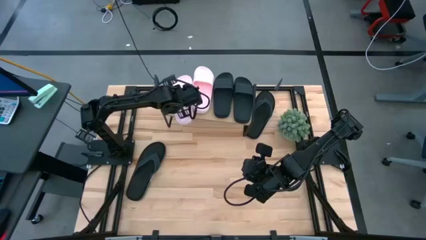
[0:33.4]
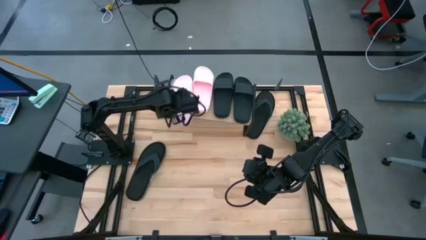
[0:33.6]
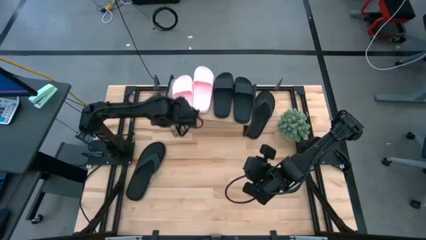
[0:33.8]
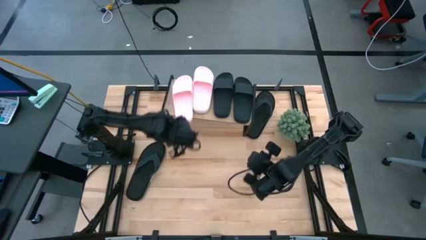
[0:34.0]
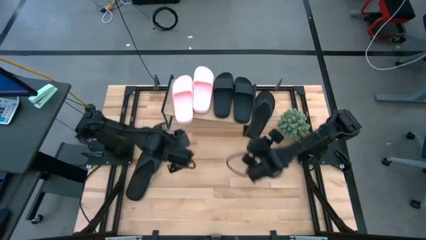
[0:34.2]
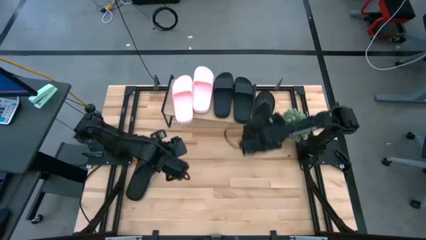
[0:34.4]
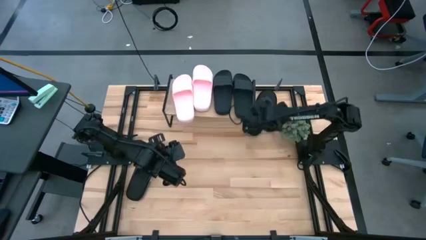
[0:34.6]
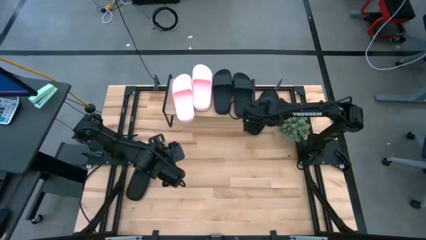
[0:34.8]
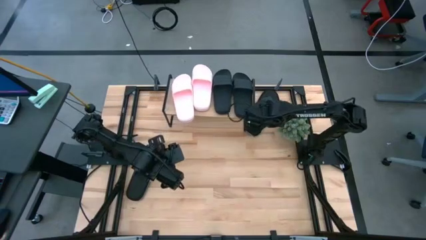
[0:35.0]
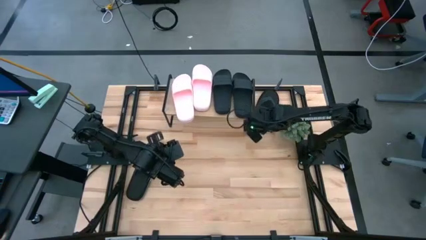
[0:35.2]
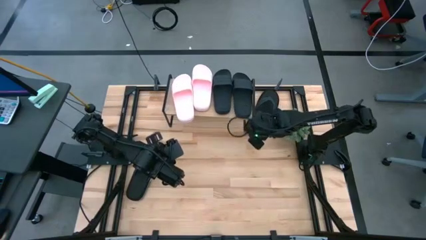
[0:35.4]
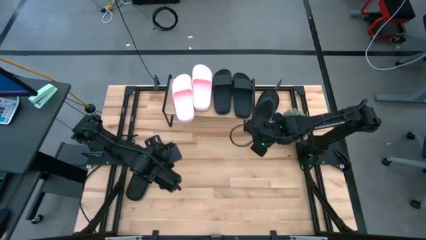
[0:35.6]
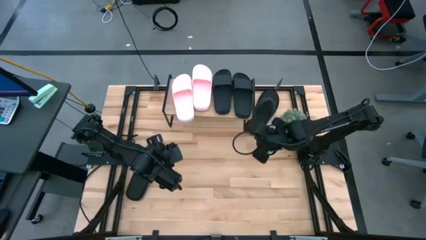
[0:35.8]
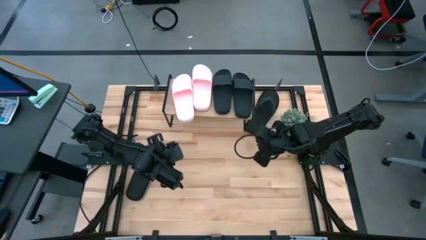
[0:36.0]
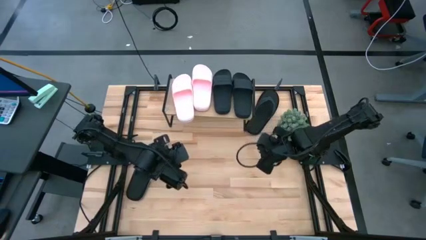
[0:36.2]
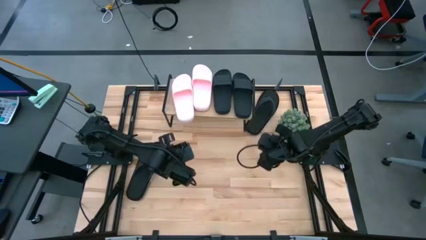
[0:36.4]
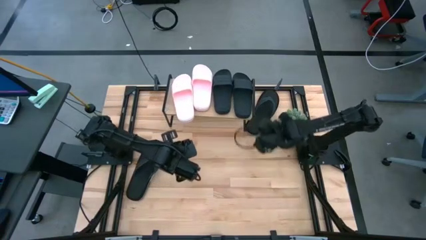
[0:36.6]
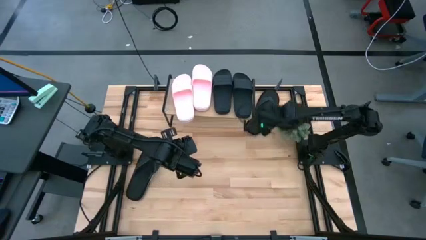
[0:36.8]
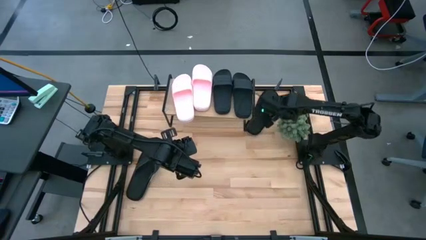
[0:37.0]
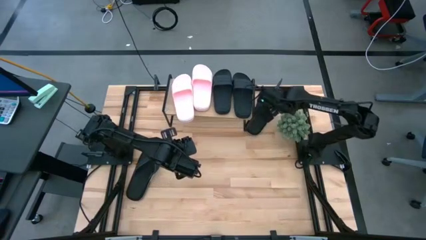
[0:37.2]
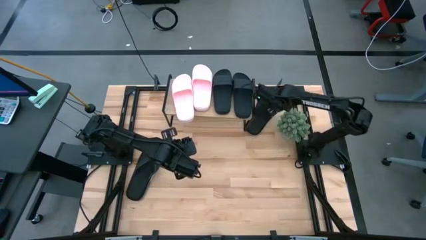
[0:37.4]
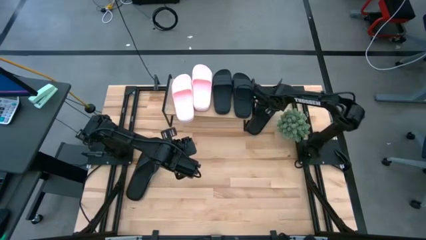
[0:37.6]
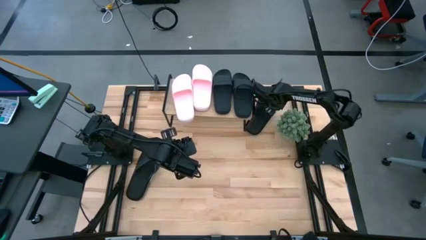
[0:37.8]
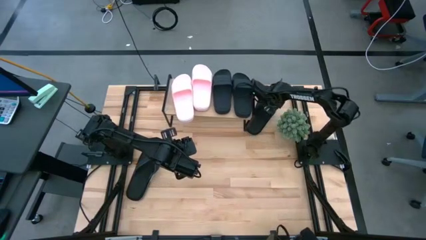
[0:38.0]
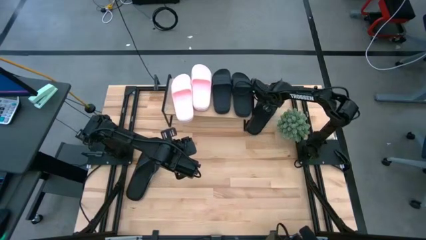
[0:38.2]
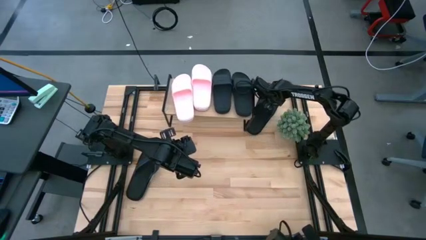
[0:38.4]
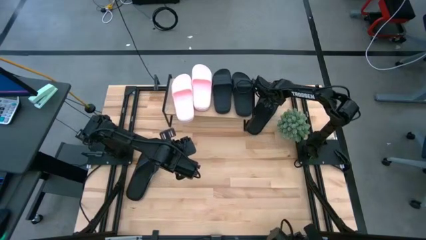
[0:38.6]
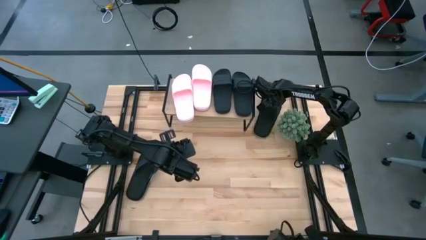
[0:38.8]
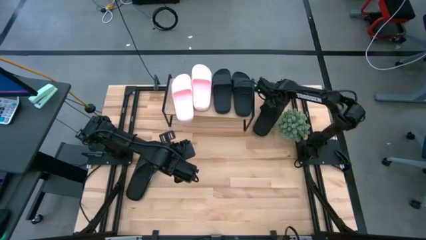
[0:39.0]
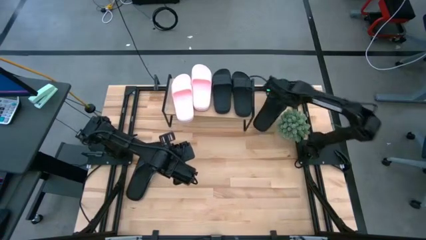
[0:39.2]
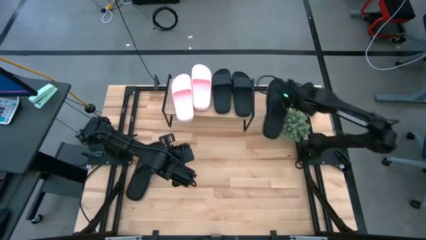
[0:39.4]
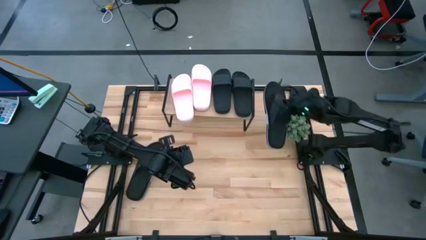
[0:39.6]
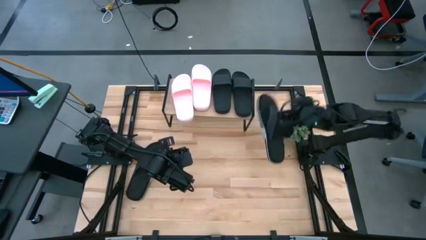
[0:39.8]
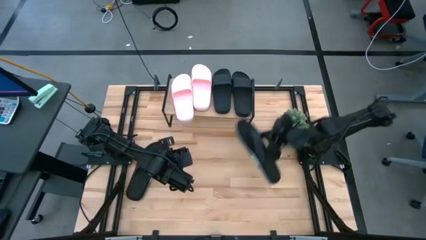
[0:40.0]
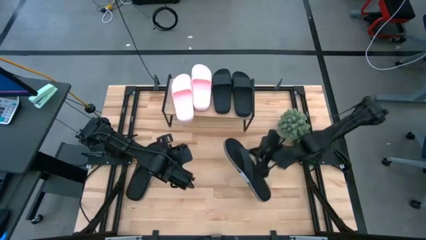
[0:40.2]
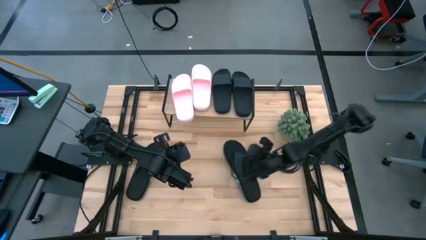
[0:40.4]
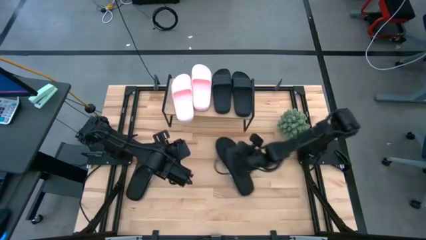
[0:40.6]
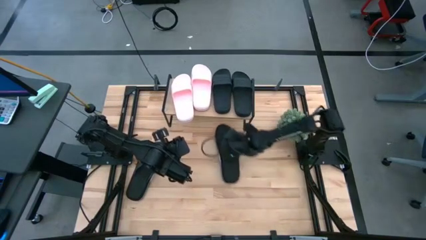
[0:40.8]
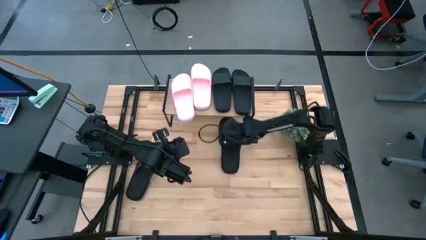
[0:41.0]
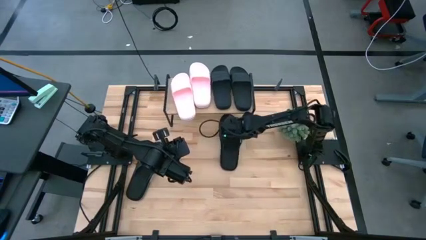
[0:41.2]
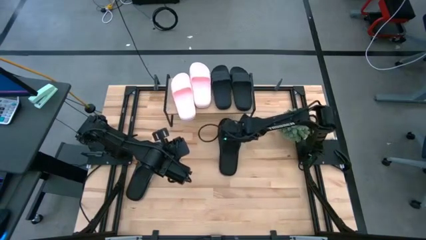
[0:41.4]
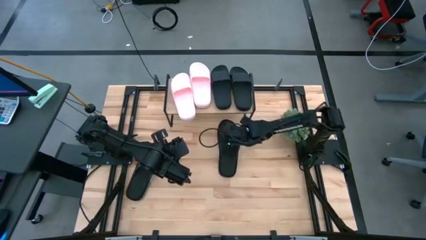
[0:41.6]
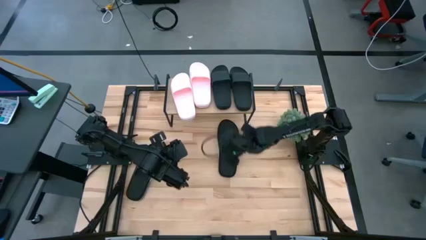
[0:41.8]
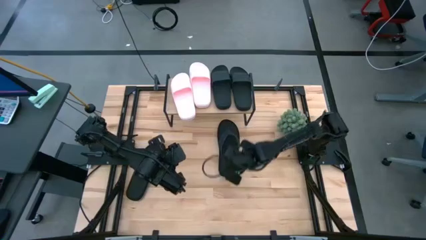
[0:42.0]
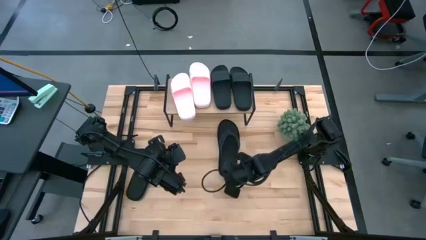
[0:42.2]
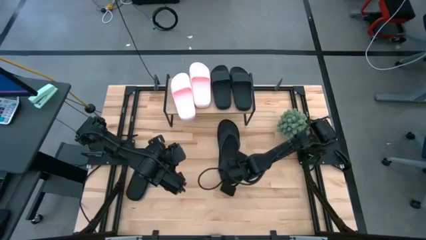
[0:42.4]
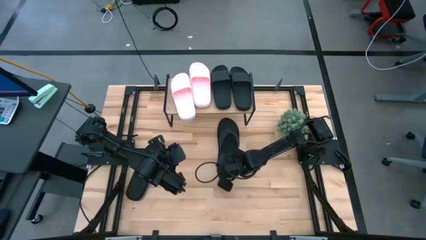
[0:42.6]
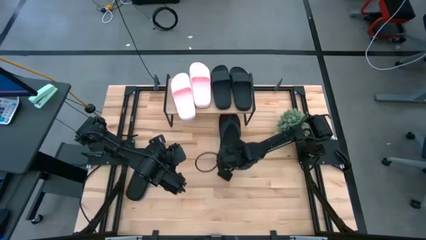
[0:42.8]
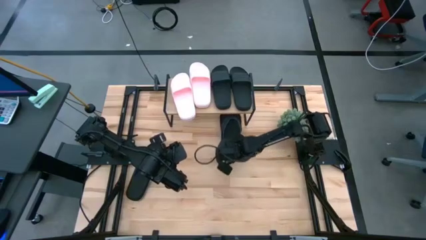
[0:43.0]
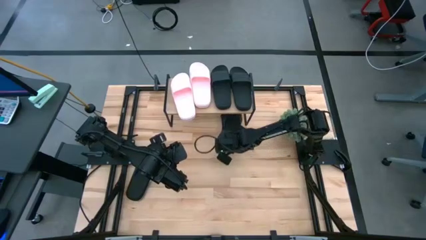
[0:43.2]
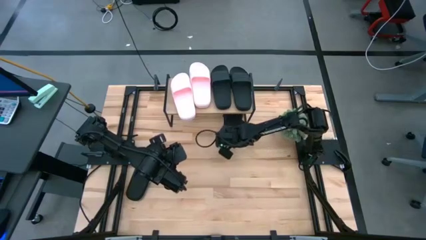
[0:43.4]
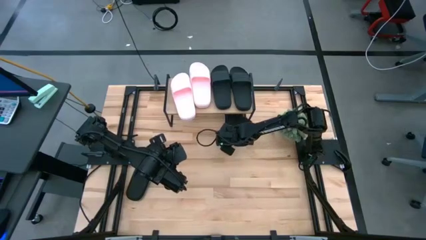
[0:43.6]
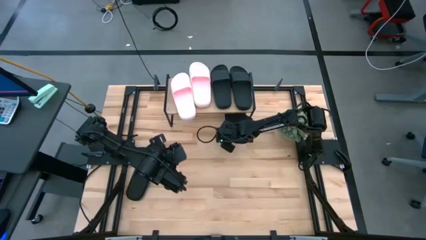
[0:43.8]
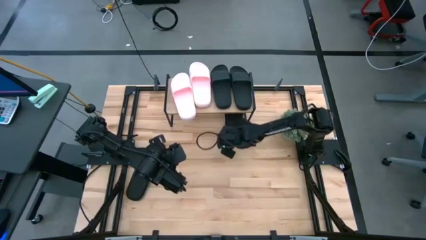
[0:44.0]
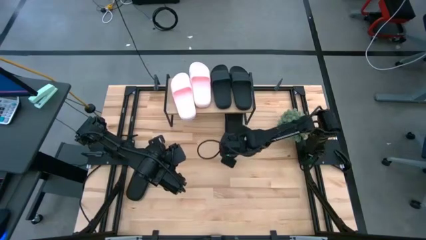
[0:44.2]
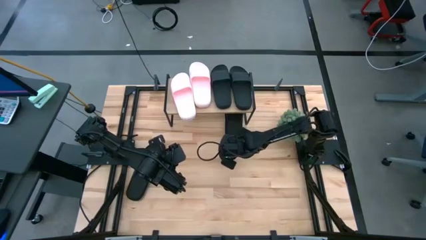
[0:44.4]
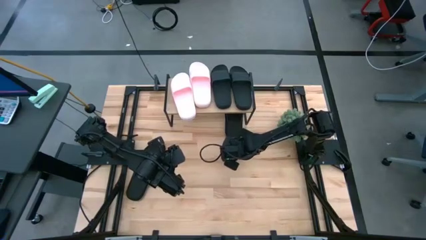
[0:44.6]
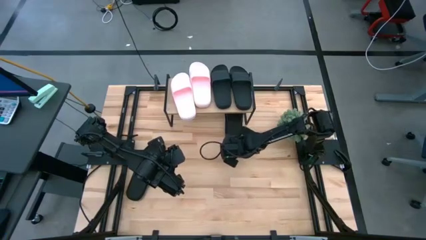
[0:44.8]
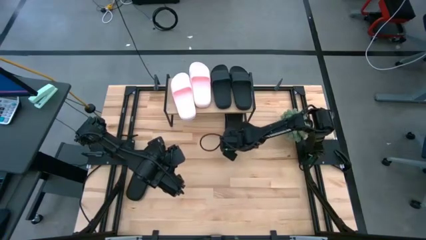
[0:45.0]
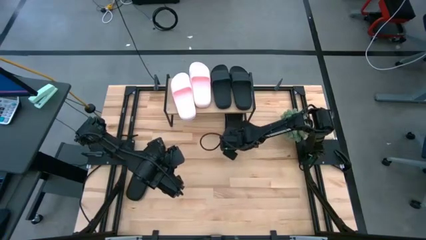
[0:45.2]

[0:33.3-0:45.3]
Task: Pick and place slides into the shelf
Put the top right flip flop under the shelf

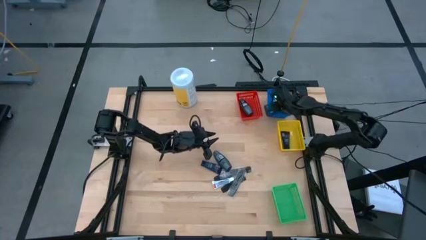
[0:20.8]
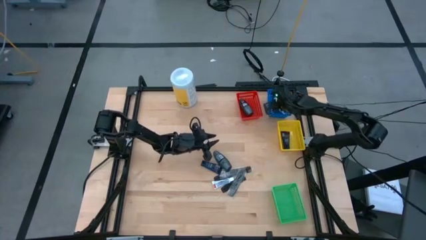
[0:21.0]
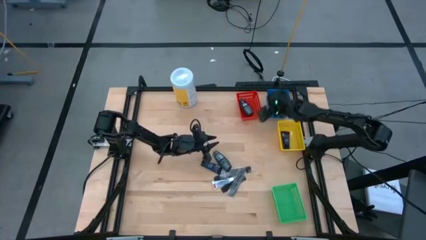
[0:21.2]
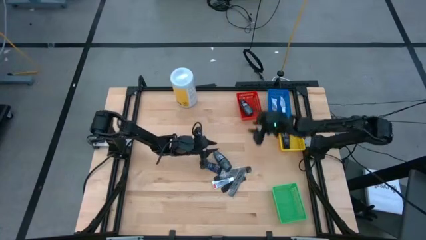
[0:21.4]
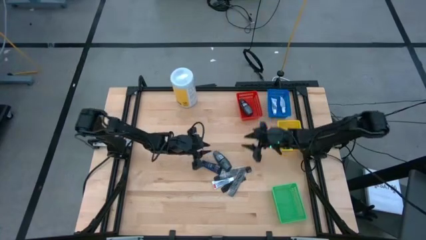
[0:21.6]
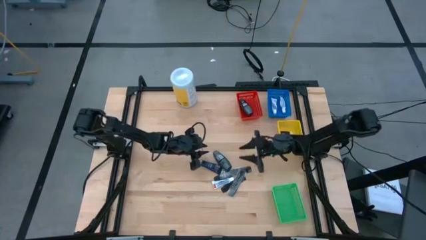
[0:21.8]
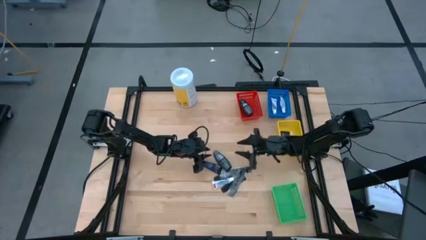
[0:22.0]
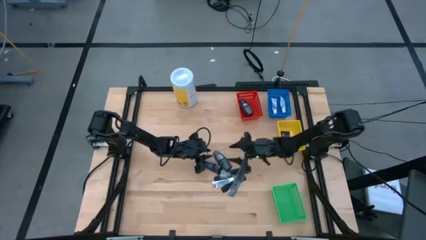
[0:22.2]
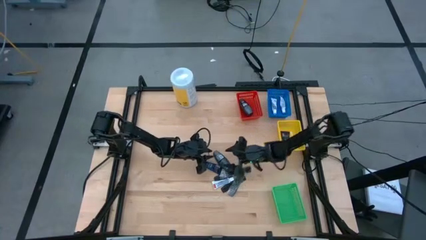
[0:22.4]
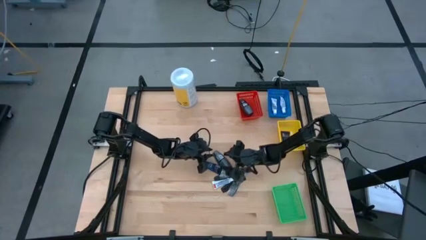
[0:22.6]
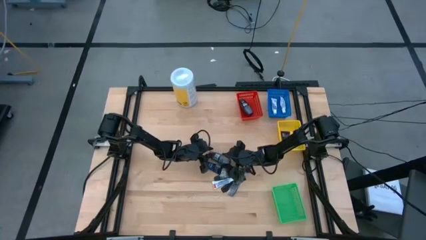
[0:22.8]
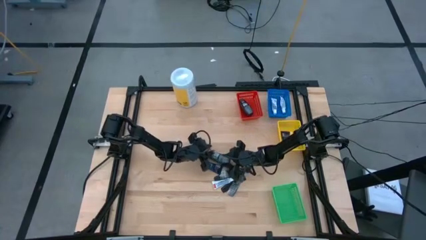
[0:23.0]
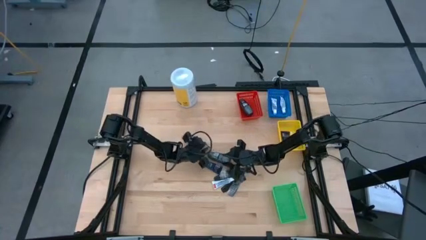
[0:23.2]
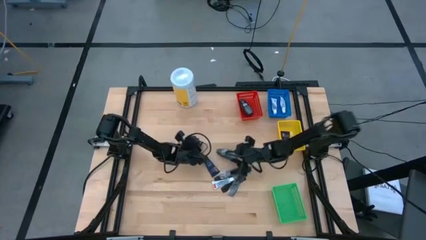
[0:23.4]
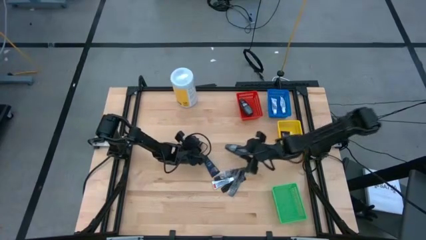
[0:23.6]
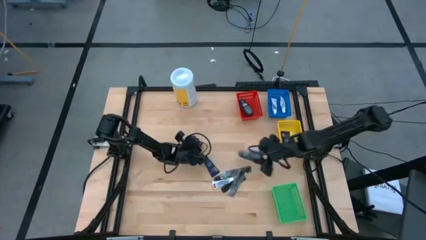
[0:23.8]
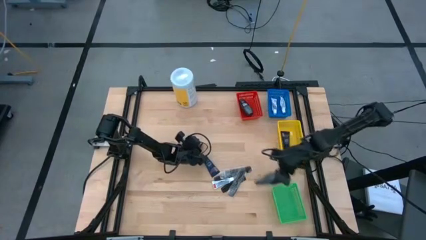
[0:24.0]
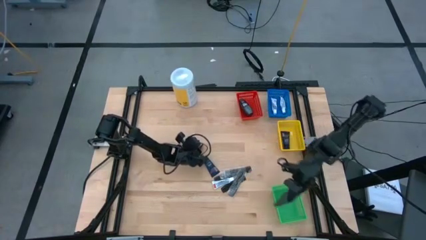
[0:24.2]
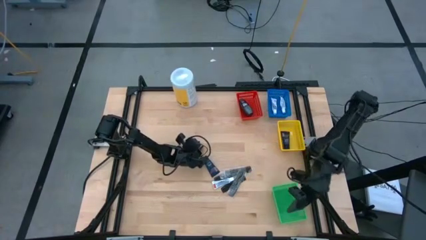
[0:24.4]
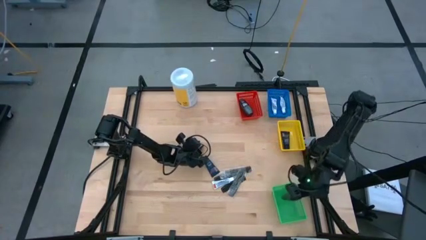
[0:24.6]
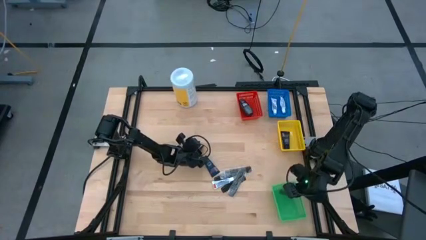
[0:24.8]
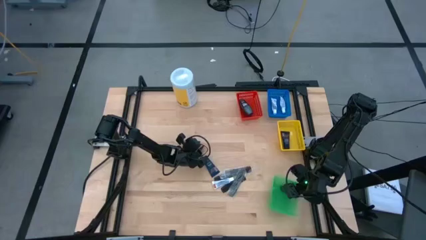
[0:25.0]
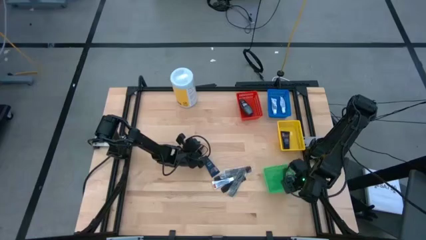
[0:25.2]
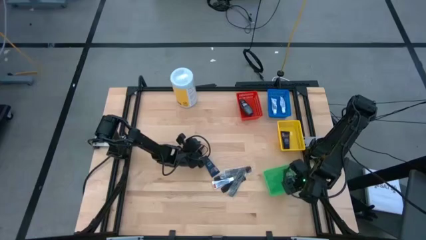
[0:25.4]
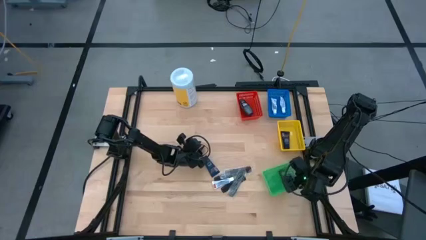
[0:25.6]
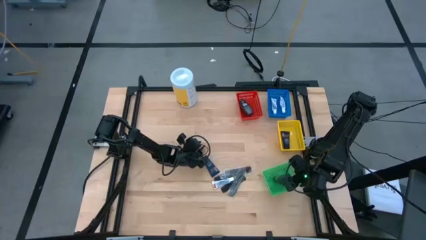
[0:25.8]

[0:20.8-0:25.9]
Task: Pick & Place Travel size toiletries
Put the gray deodorant into the green bin
